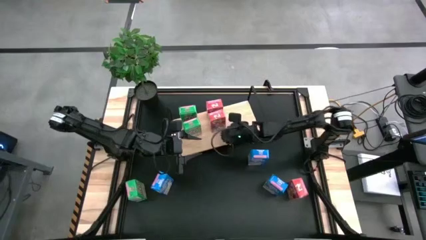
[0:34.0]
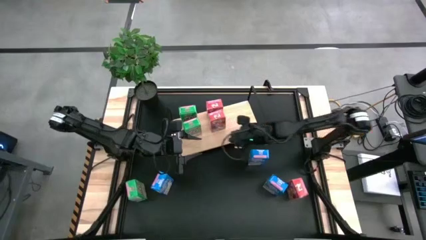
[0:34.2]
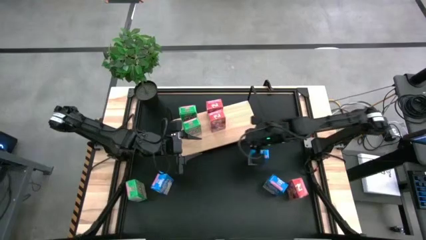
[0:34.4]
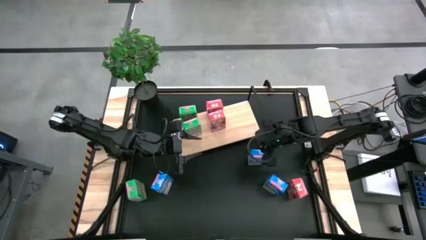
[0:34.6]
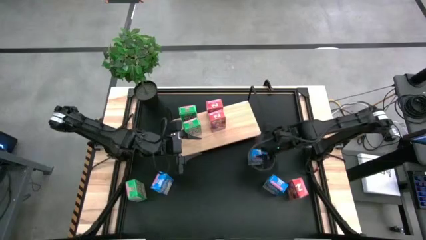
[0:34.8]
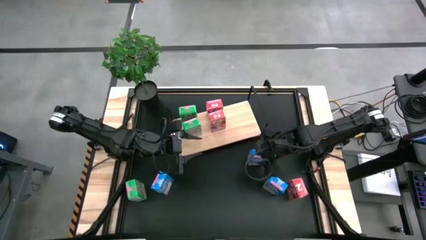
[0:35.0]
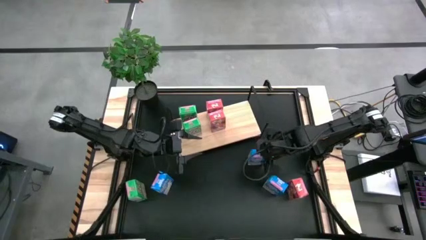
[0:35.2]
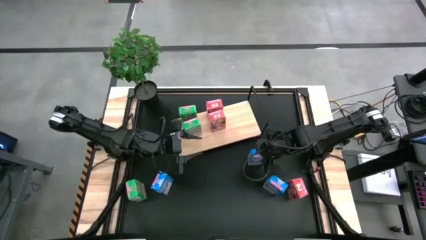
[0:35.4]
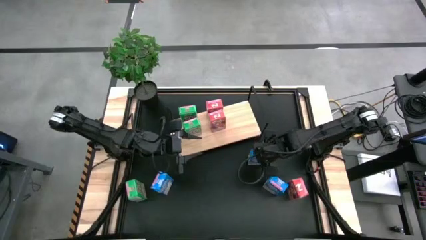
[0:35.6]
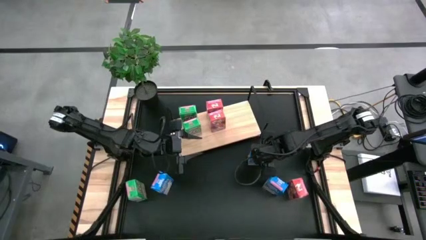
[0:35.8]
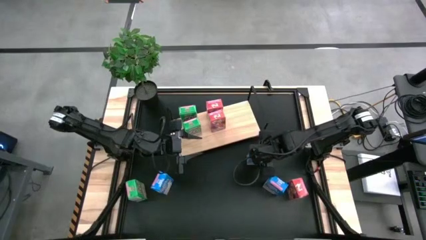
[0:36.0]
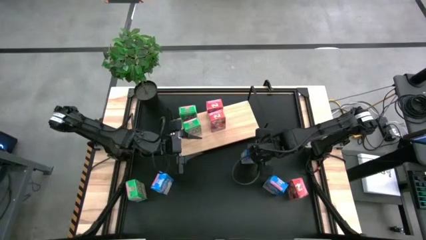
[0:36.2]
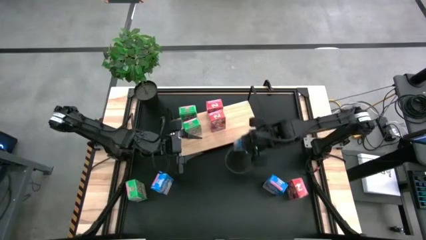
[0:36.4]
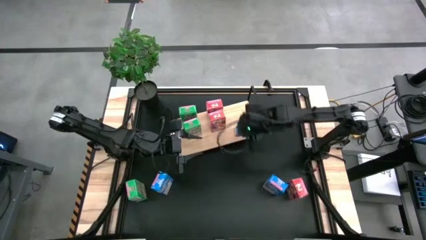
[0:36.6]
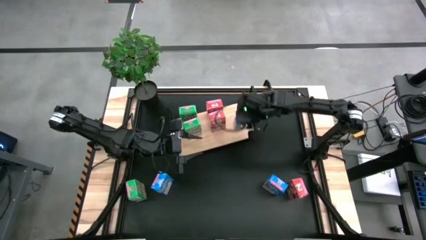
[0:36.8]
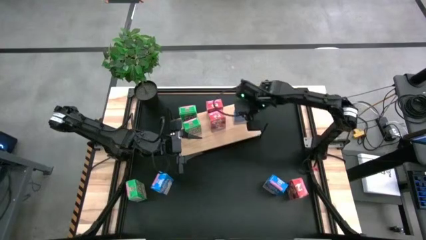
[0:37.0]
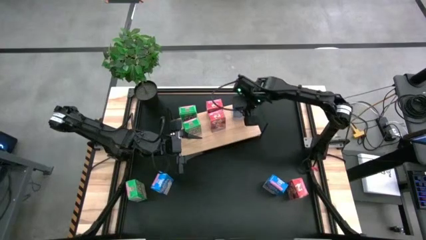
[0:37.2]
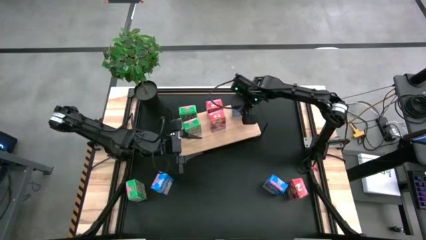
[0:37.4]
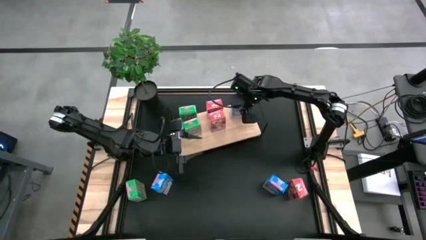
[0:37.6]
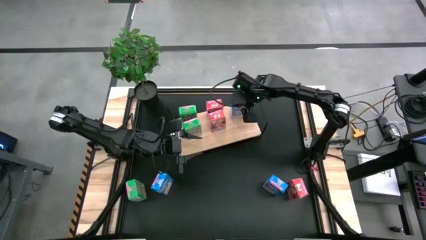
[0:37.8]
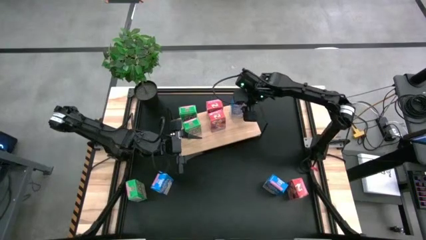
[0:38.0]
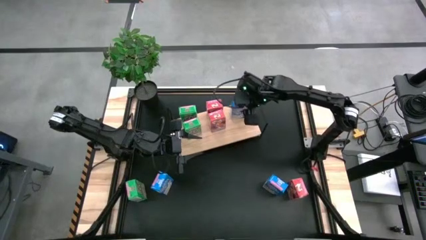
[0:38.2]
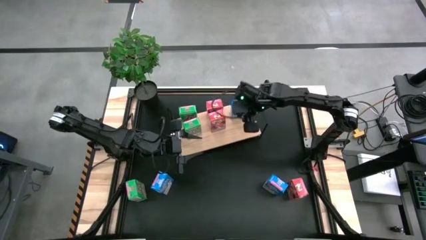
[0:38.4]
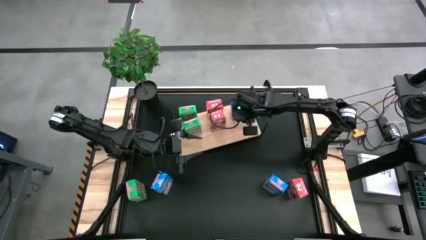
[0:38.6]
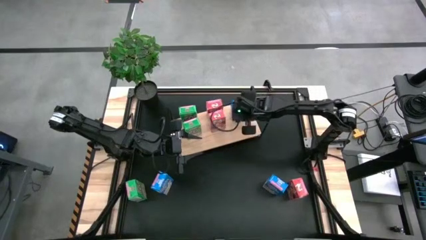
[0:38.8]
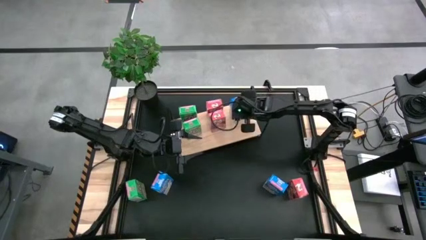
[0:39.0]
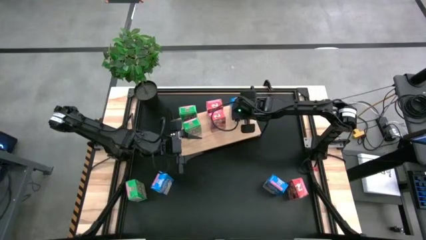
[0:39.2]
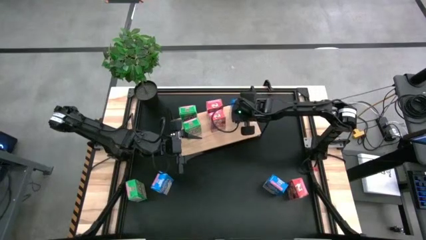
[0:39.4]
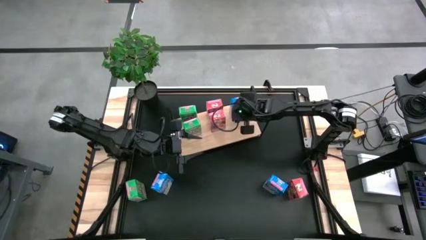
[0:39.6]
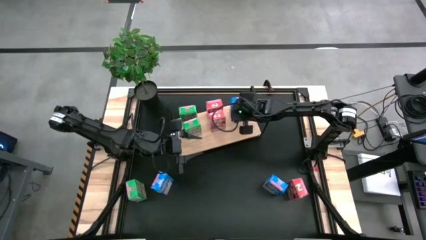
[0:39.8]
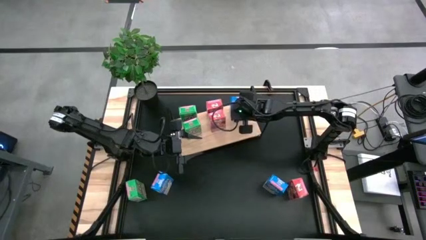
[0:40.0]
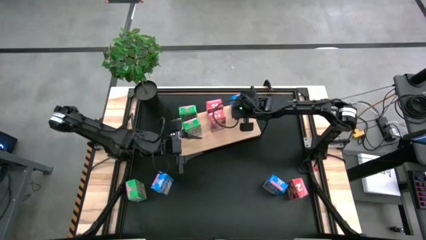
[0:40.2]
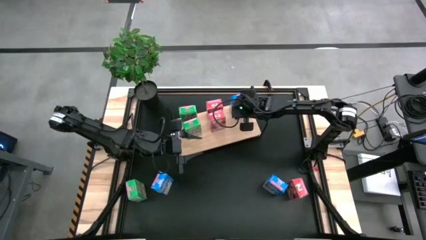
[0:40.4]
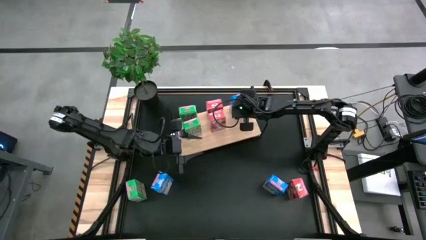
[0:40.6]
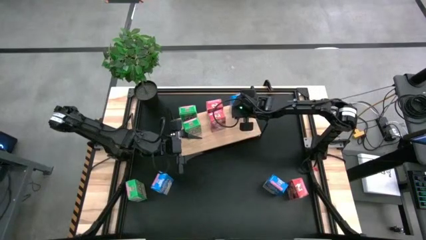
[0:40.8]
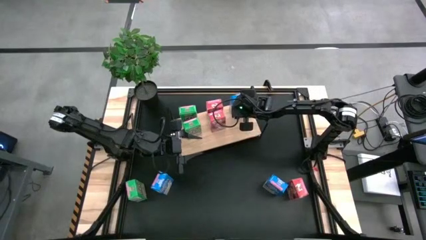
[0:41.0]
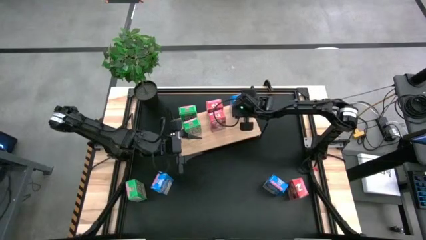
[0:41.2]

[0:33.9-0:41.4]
Task: Stack cereal on shelf
Put the top blue cereal box on the shelf

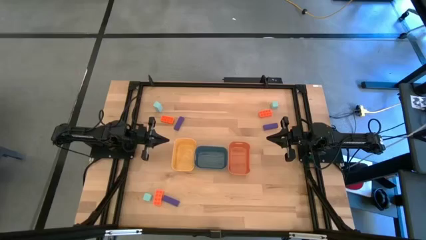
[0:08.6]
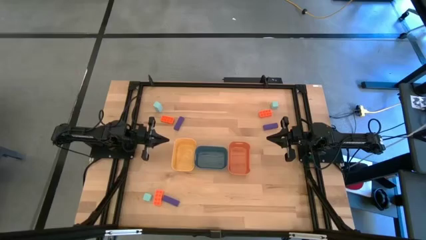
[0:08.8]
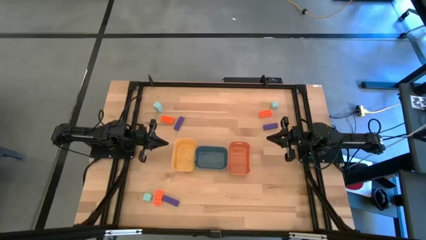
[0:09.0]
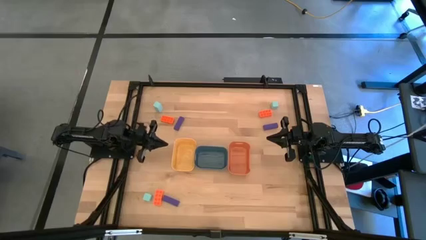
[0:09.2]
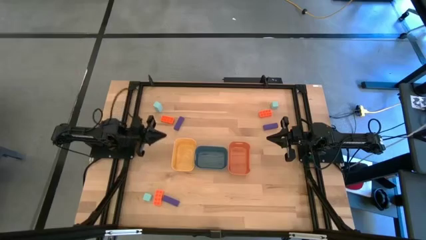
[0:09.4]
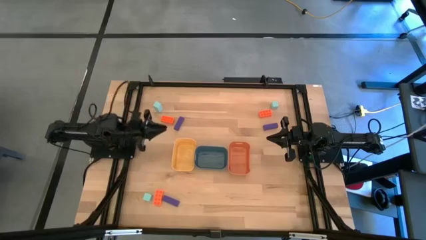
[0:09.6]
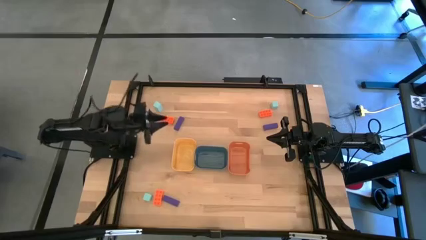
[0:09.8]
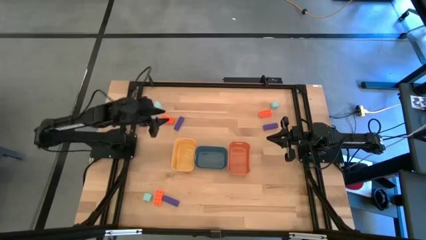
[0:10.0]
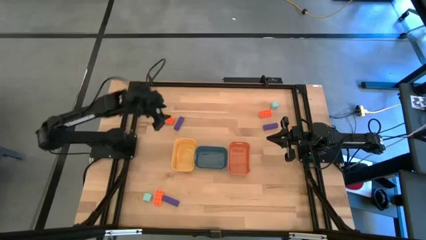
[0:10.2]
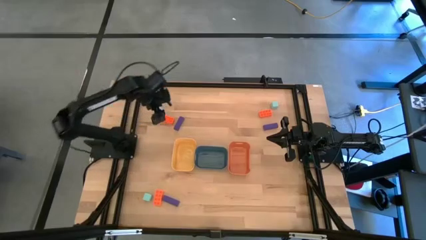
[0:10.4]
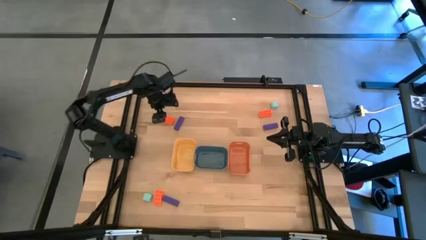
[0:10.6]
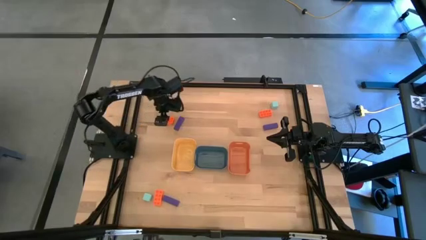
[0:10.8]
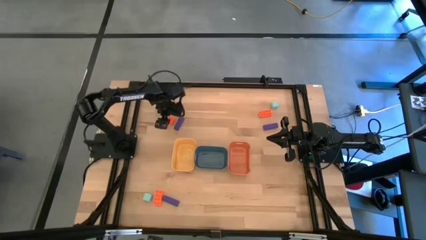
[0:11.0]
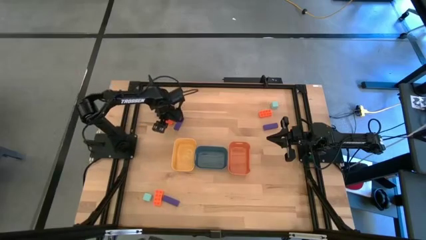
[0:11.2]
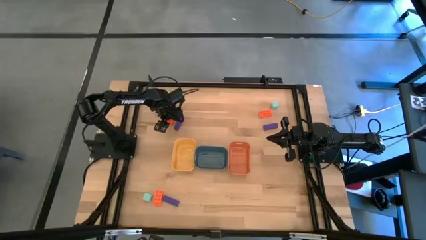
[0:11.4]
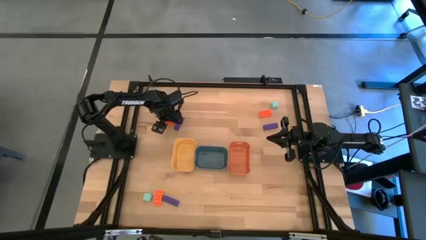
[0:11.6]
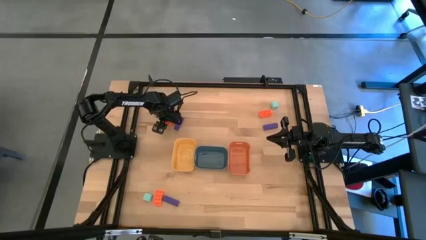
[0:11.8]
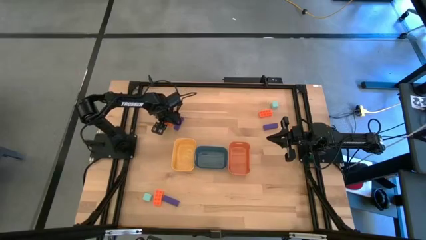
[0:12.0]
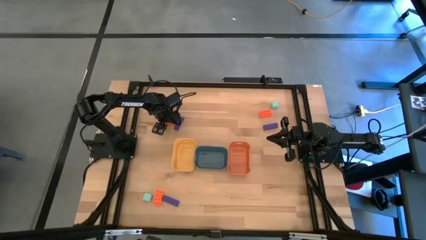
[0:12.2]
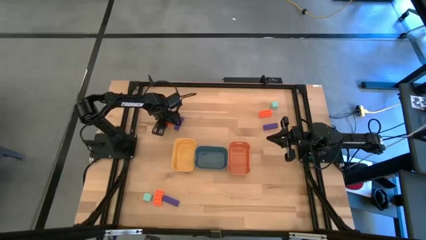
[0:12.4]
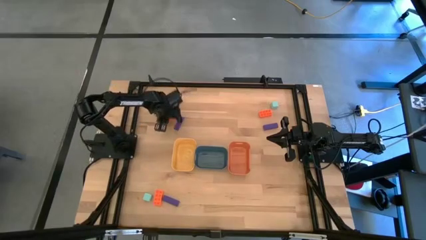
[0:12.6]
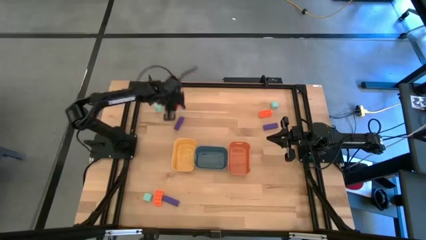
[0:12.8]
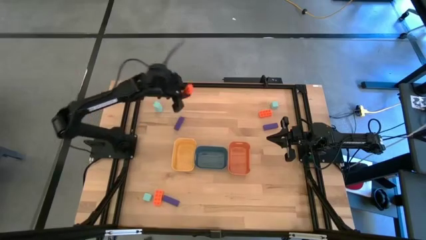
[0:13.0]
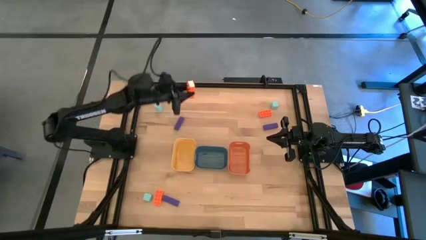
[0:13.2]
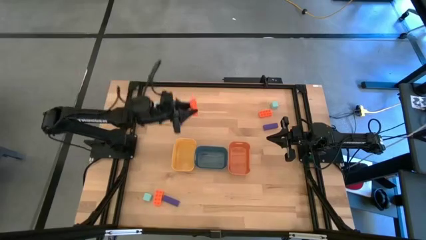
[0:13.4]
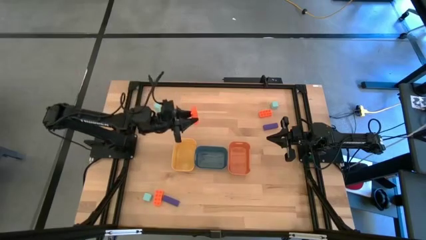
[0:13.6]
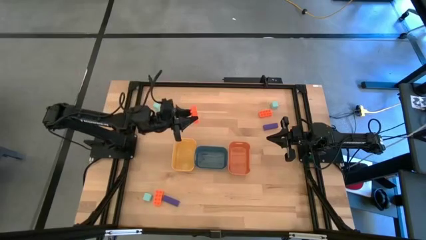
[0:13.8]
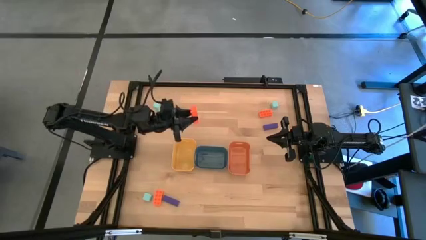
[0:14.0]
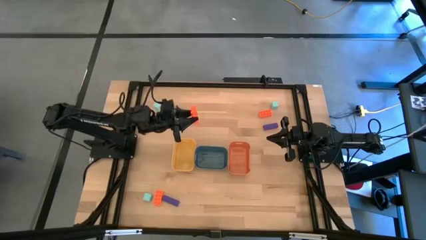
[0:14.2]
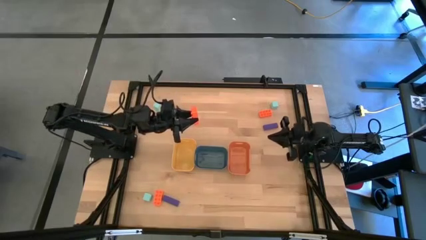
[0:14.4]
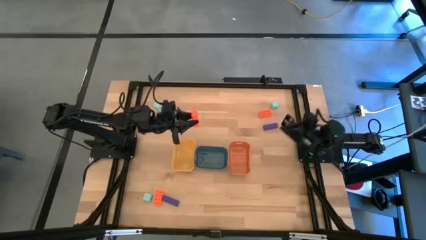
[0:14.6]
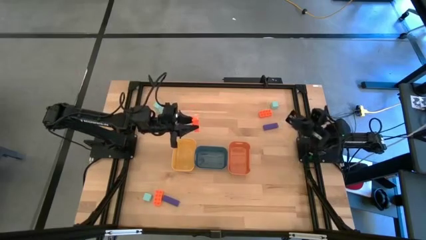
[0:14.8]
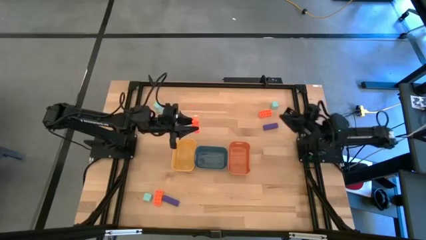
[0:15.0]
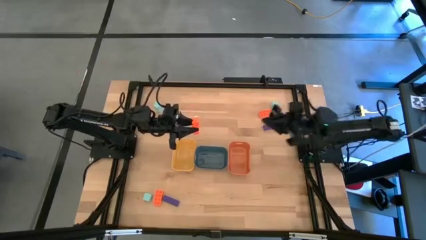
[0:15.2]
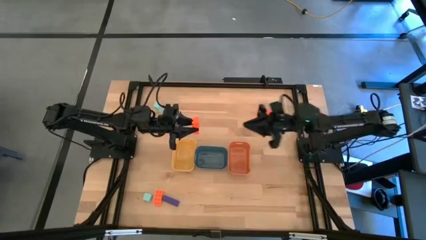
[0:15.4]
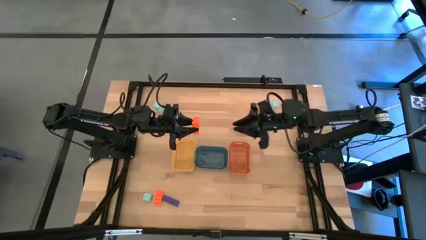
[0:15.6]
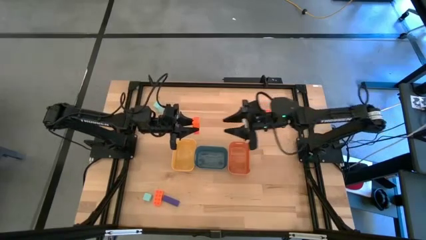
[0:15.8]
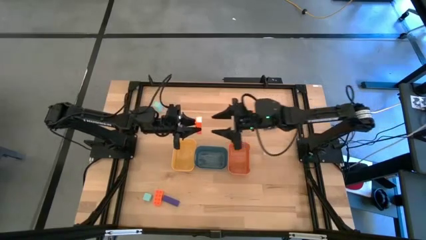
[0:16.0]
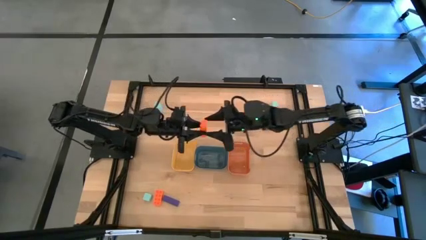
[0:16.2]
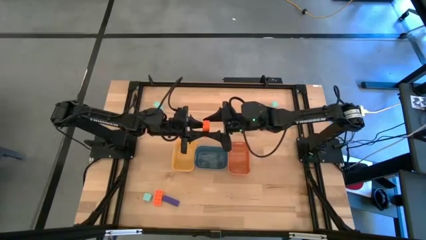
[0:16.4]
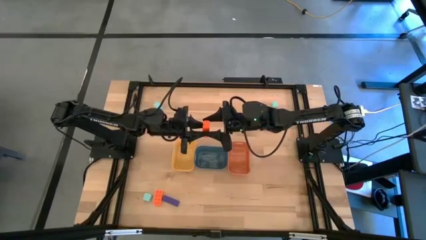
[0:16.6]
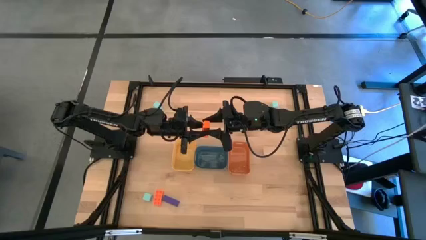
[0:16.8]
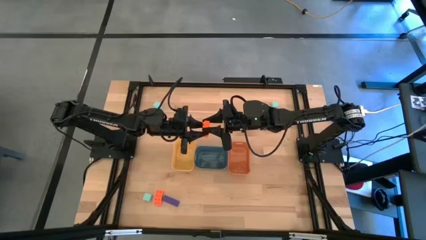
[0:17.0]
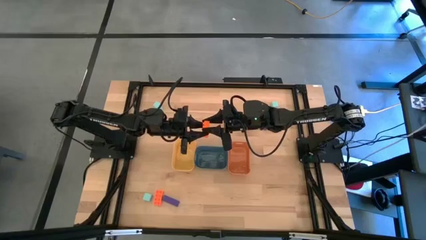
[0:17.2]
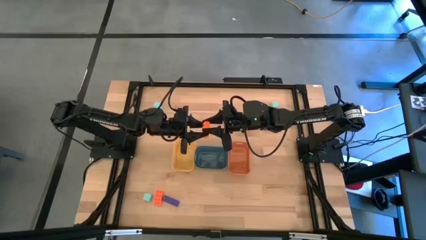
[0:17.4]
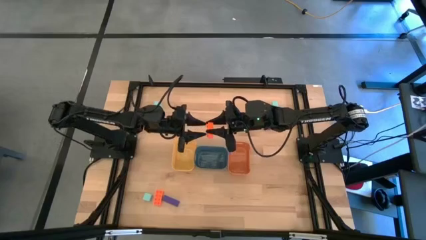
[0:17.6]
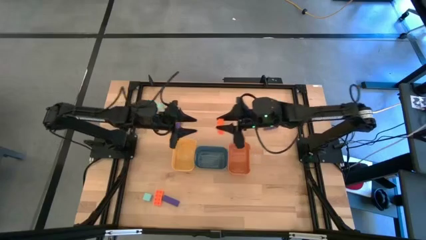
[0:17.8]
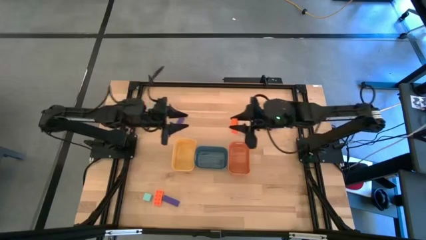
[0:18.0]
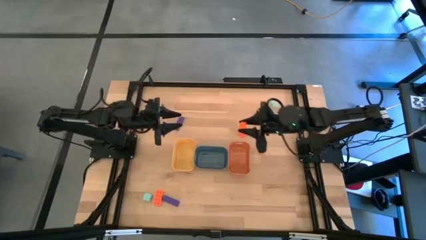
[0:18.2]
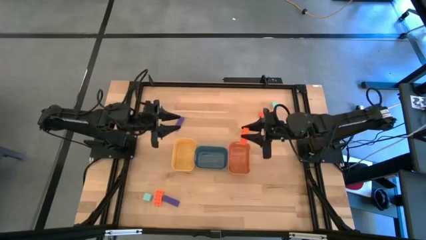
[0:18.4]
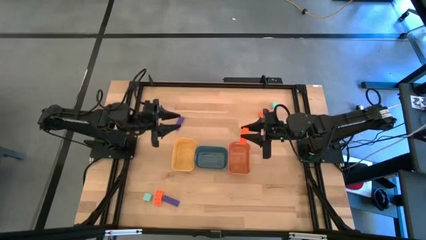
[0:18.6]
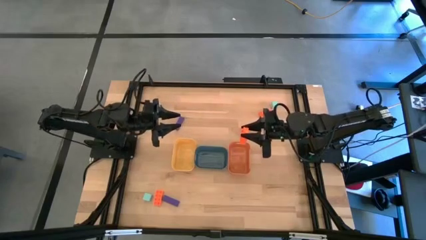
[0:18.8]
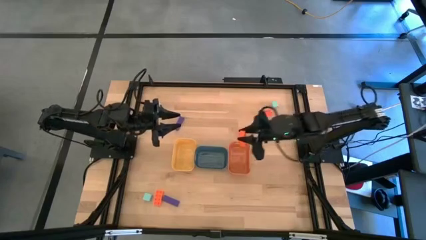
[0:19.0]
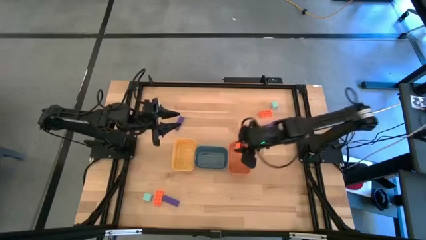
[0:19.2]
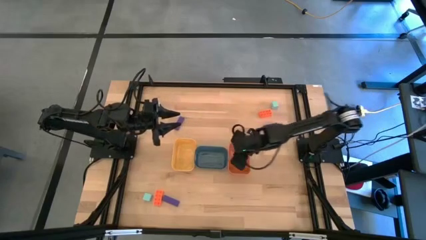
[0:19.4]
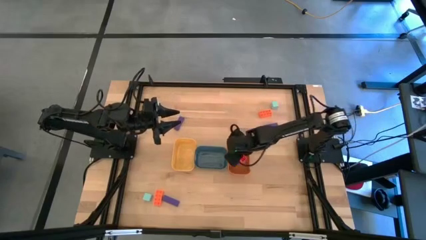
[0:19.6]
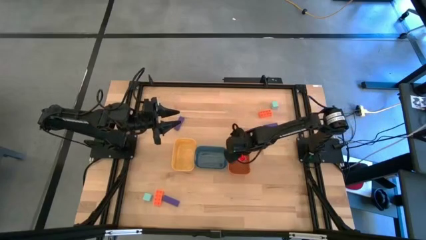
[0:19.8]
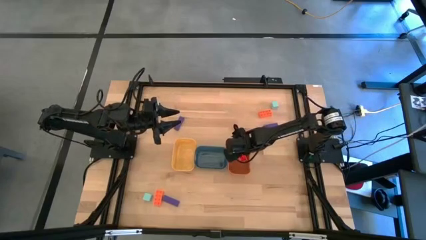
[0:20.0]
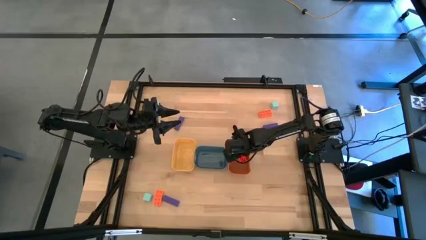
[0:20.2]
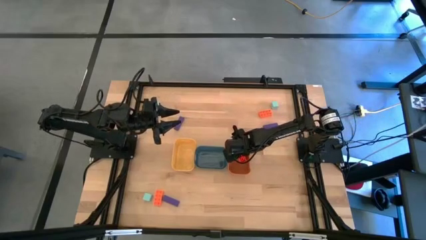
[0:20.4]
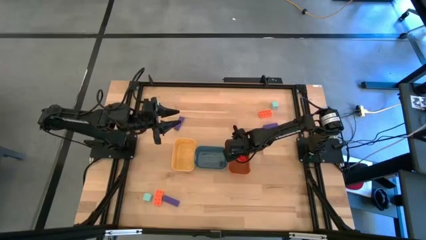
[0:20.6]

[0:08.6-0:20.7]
Task: Sort & place blocks by color
Put the top left orange game piece into the orange bin
